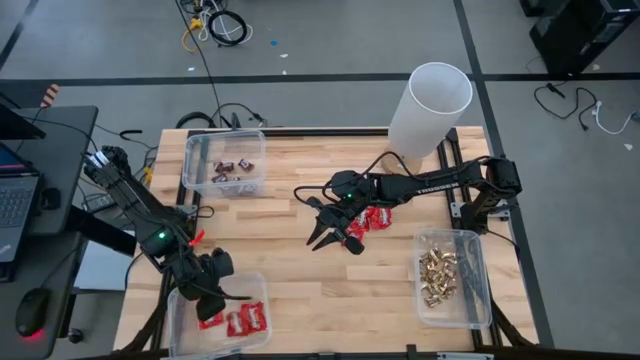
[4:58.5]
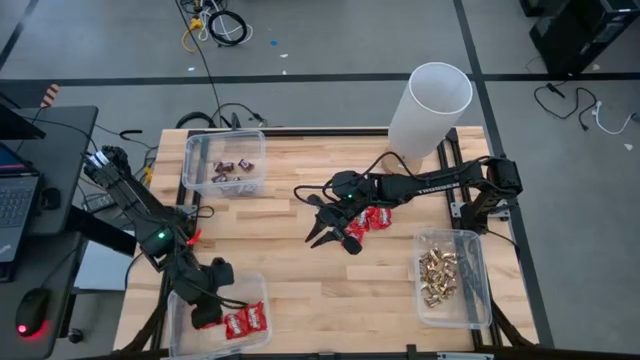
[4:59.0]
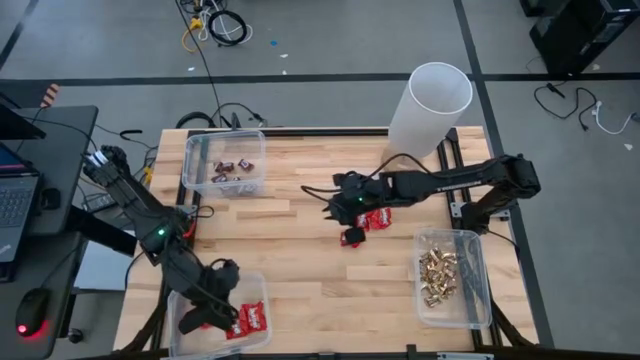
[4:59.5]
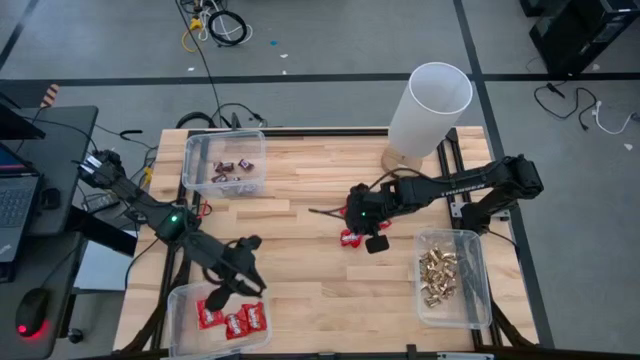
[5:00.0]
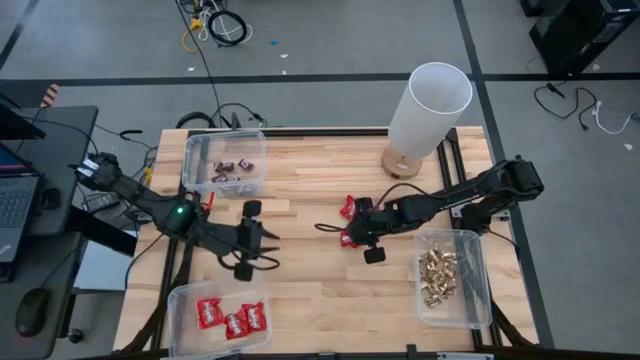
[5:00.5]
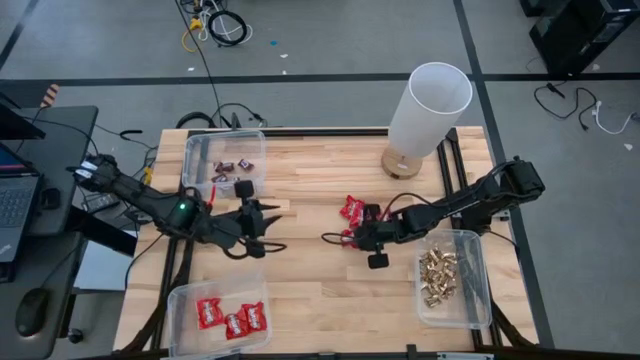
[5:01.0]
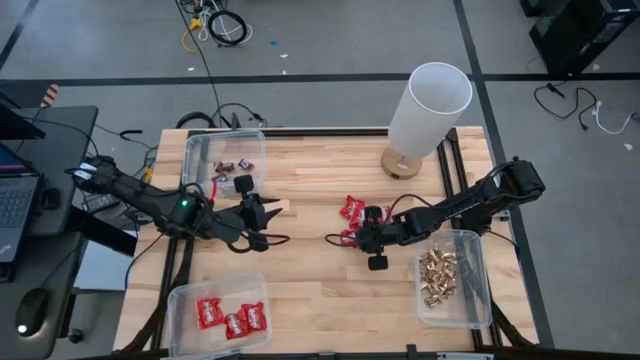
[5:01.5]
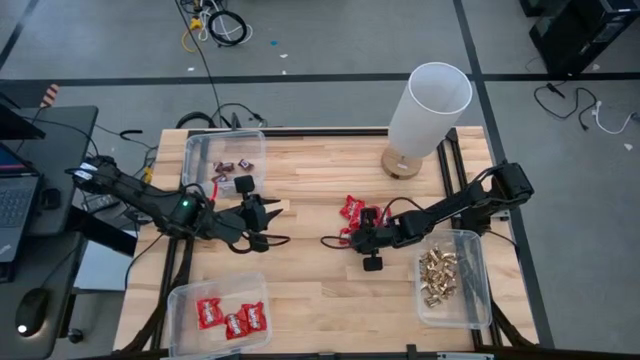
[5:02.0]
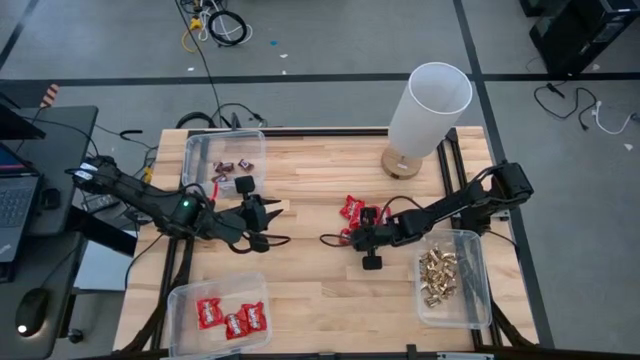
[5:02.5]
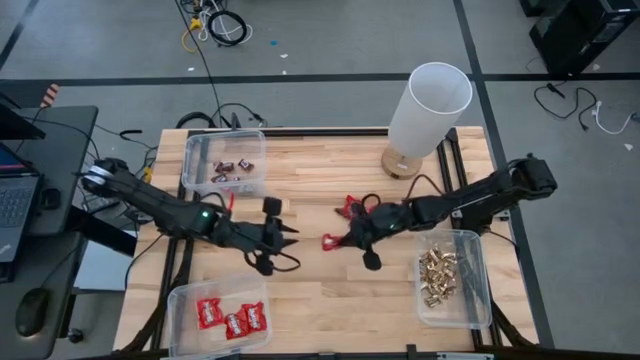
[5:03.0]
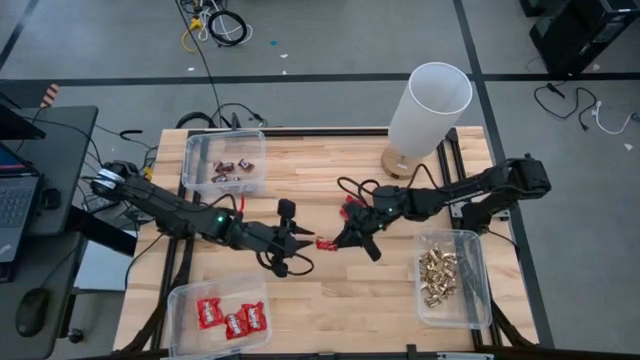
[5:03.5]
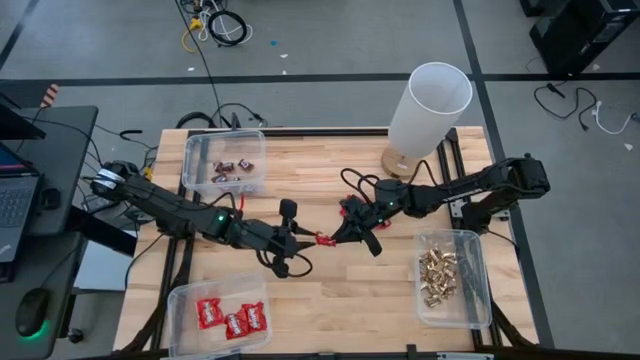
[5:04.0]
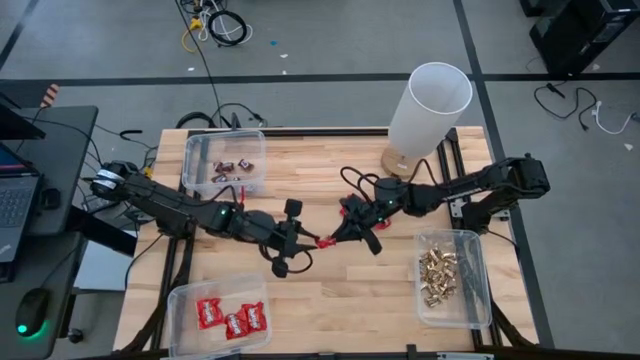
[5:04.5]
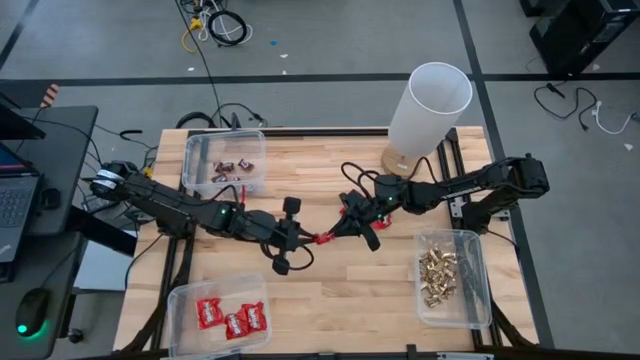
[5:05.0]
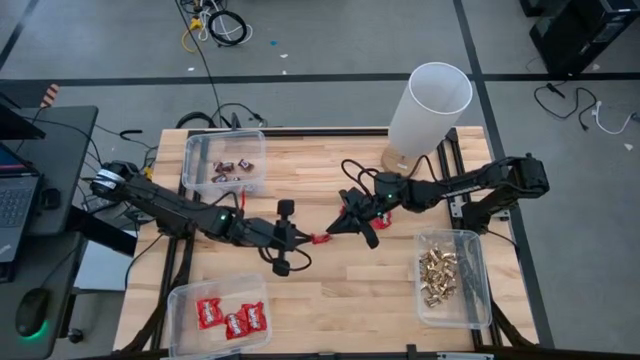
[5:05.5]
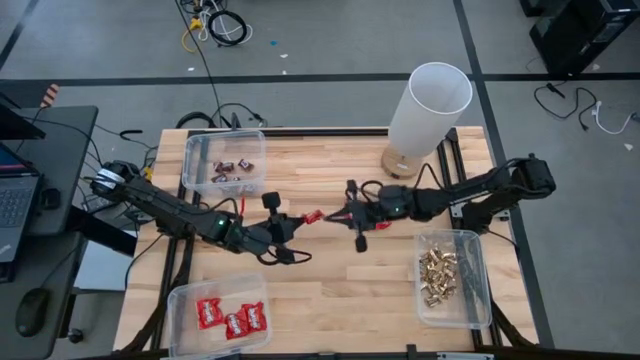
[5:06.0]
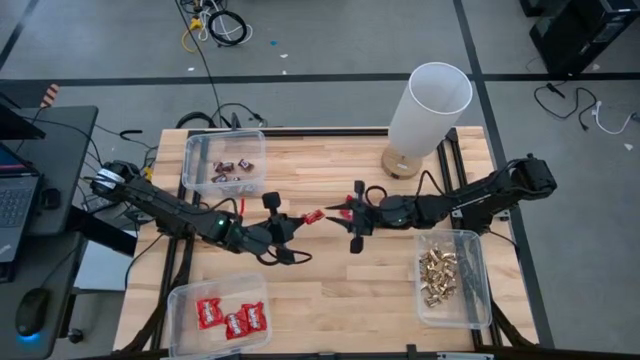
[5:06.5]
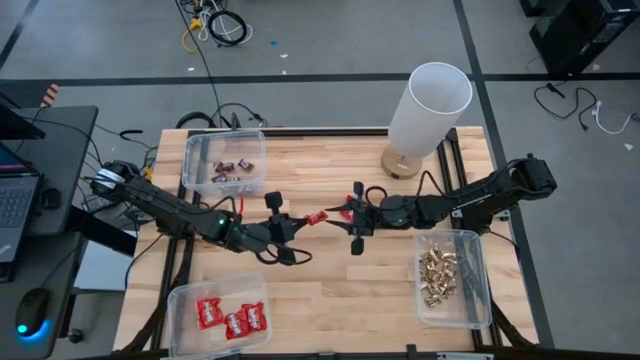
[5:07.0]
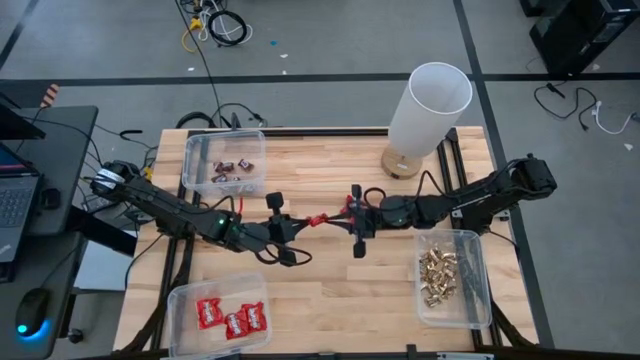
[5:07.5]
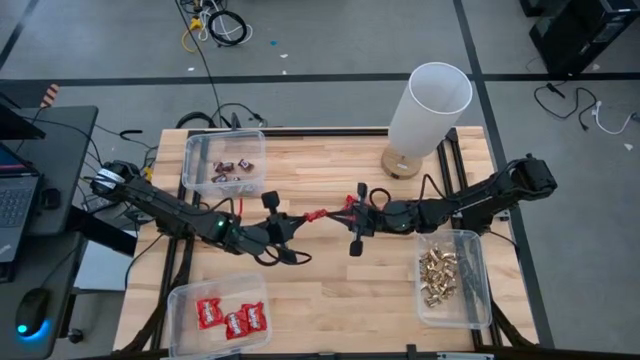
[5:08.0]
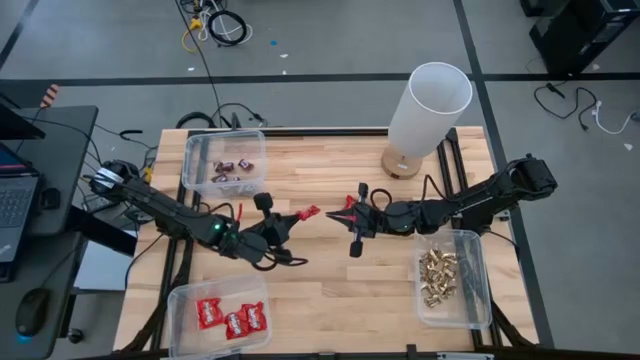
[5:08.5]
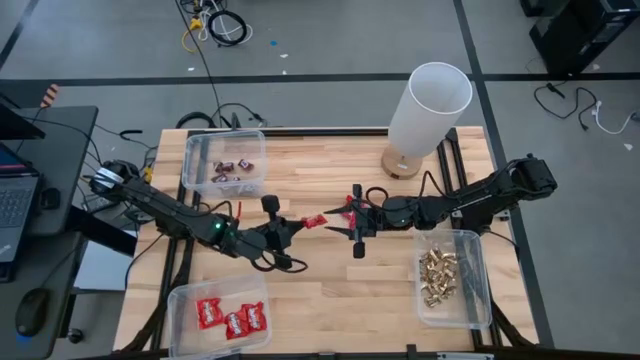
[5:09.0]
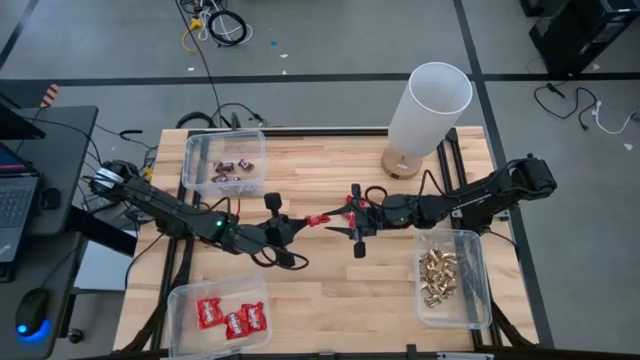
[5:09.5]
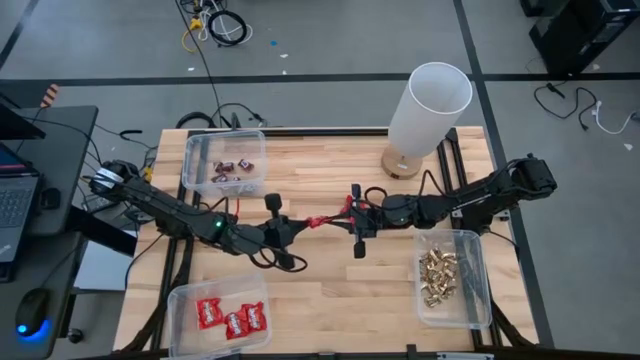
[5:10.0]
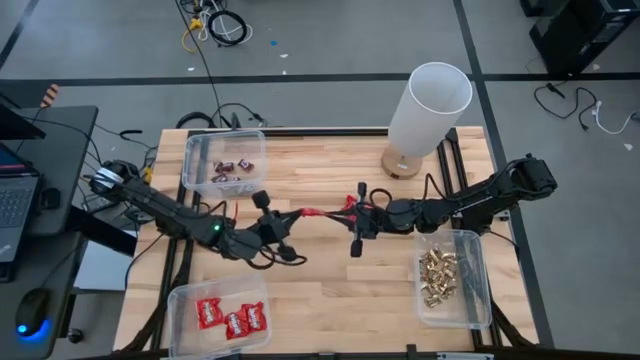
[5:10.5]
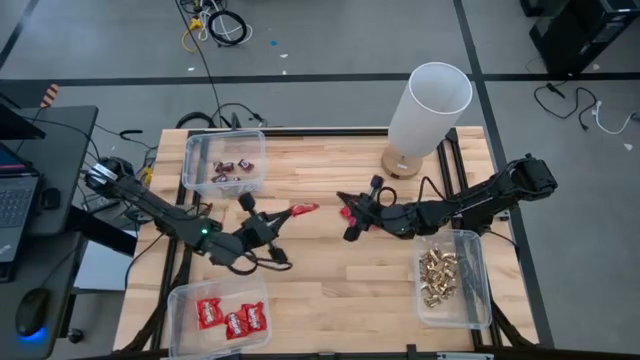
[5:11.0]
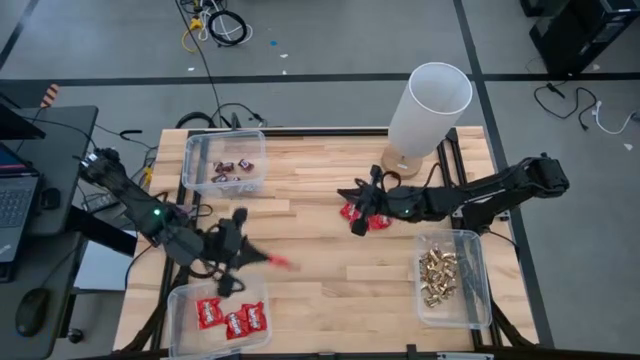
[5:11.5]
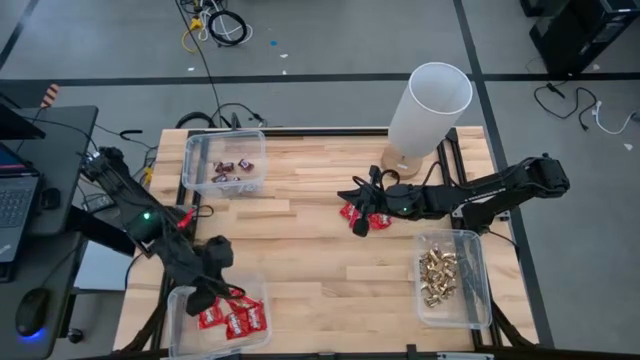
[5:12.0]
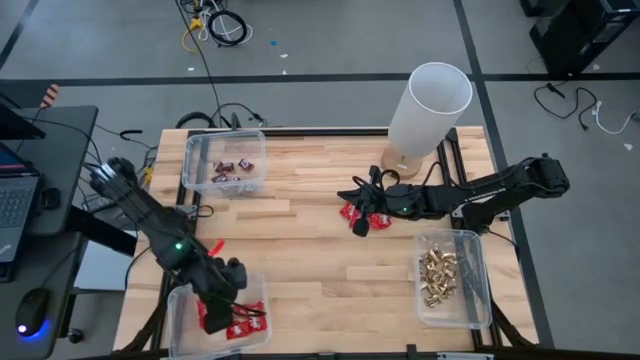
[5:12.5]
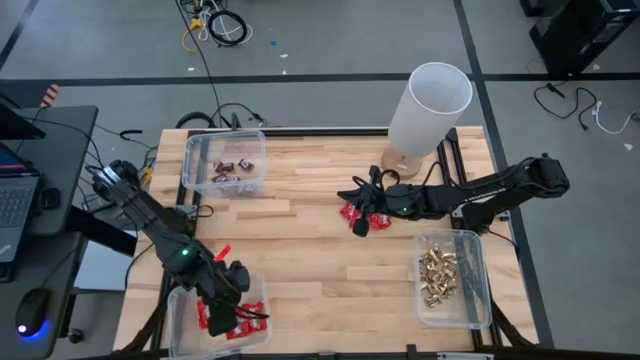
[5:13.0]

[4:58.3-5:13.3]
Task: Sort candy
Put the red chocolate into the bottom left transparent bin
